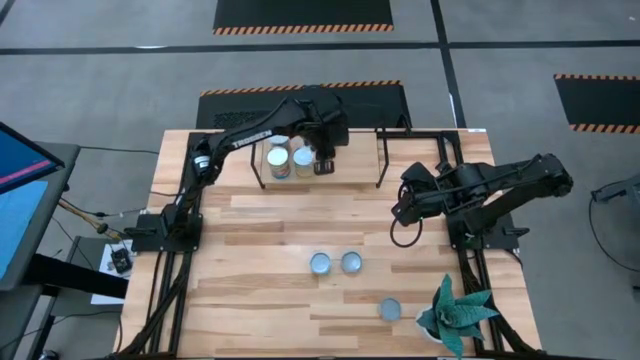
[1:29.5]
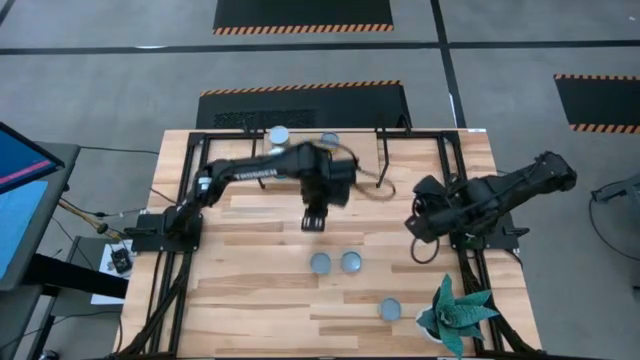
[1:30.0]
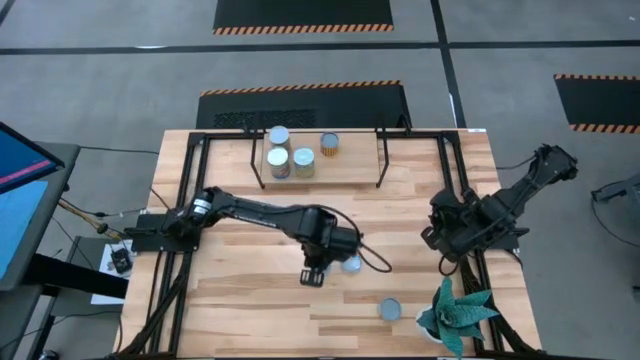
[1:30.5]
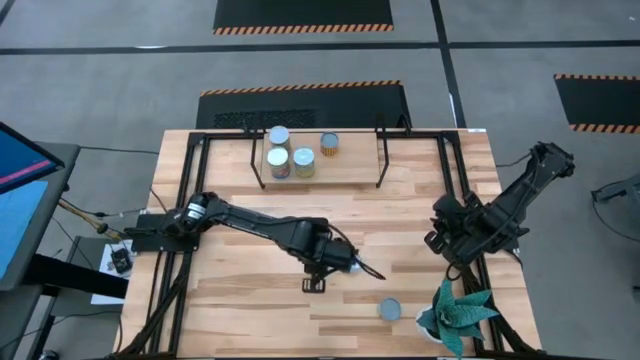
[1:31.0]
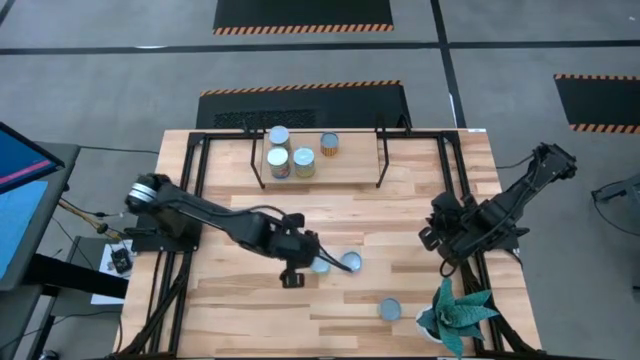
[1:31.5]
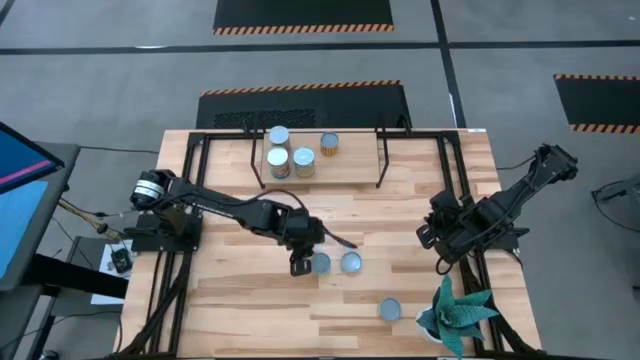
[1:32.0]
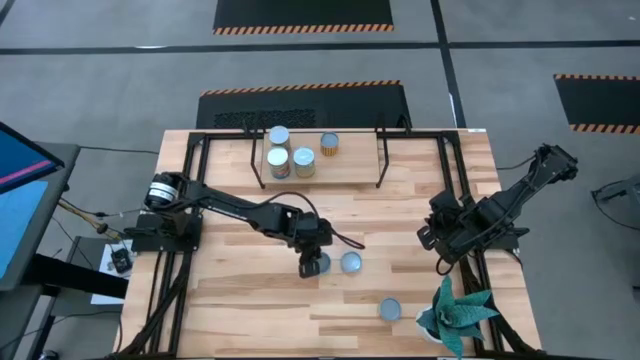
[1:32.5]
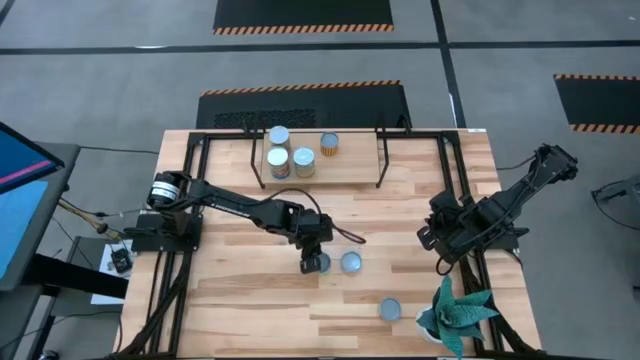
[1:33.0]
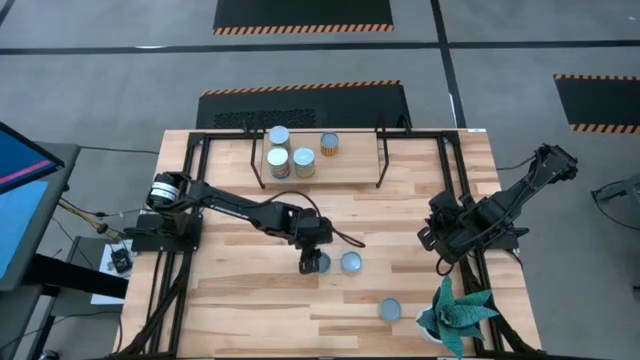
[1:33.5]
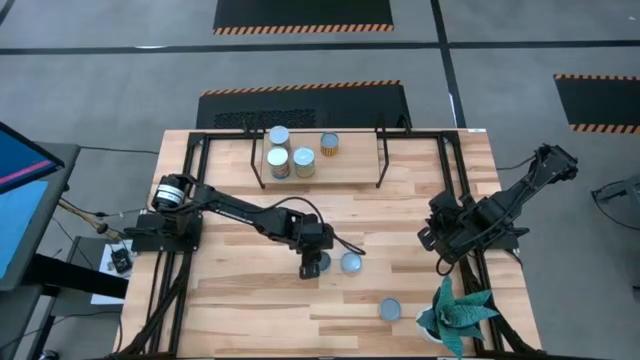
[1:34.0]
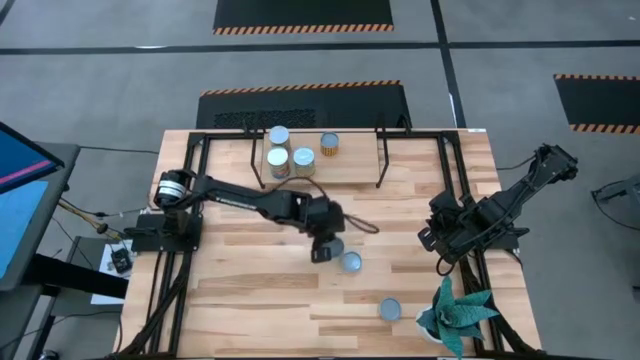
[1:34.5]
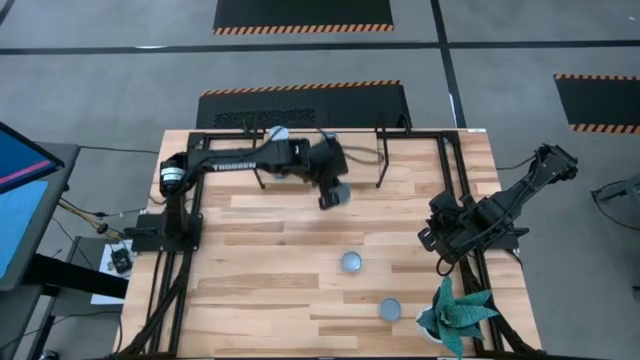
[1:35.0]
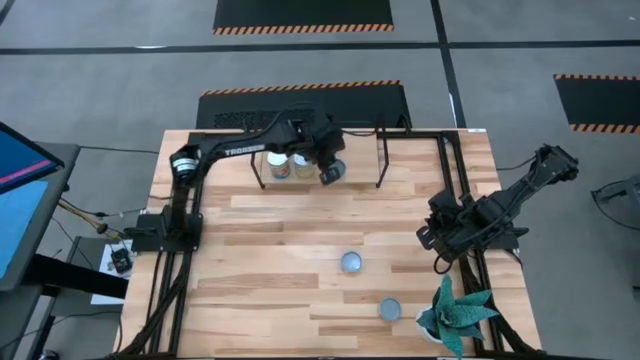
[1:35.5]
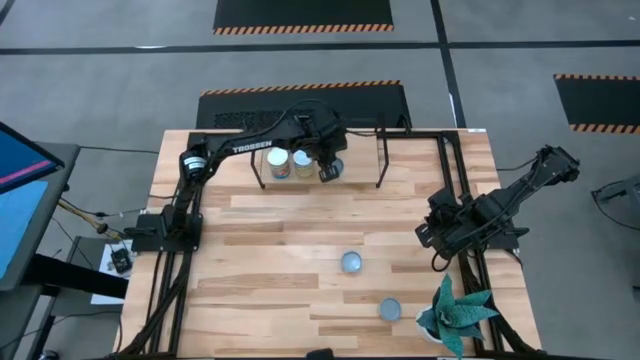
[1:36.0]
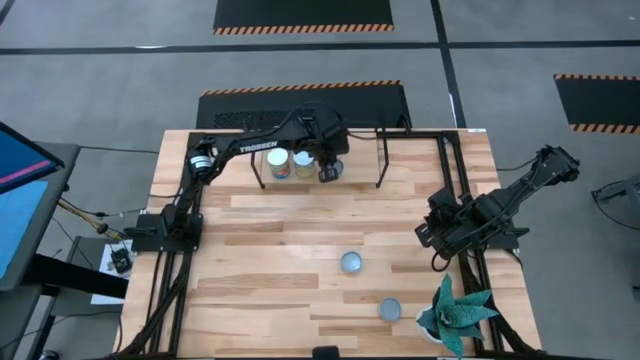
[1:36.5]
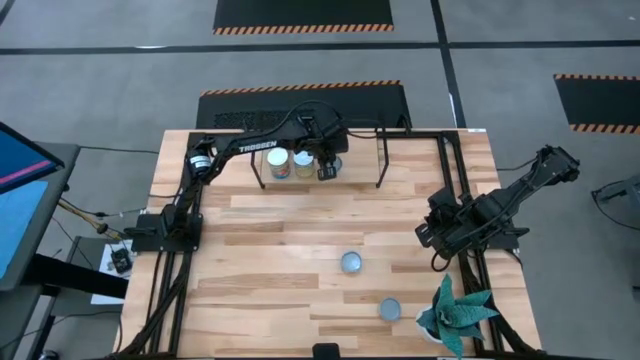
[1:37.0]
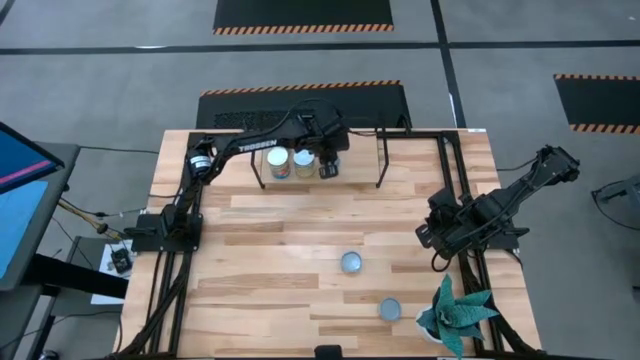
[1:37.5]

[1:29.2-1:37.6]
Task: Pick and place cans onto a shelf
Put the canned peas on the shelf

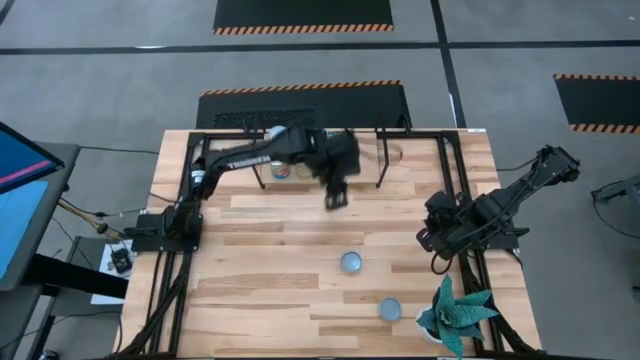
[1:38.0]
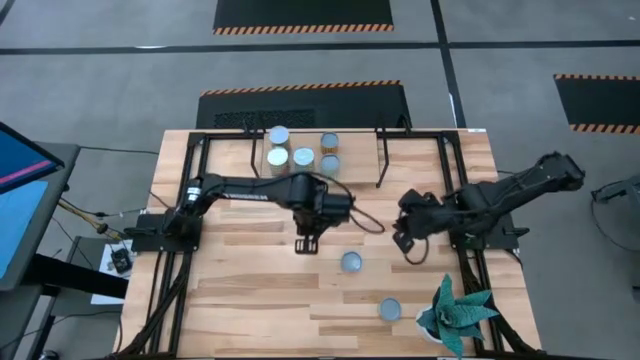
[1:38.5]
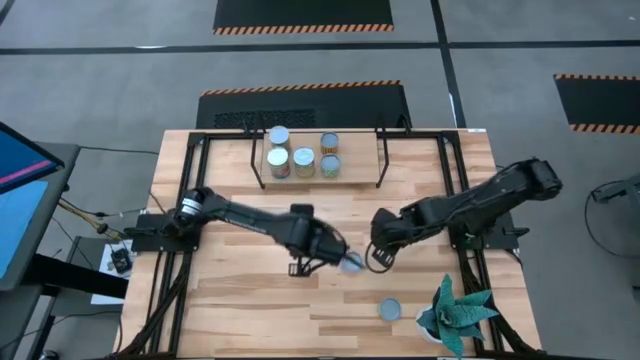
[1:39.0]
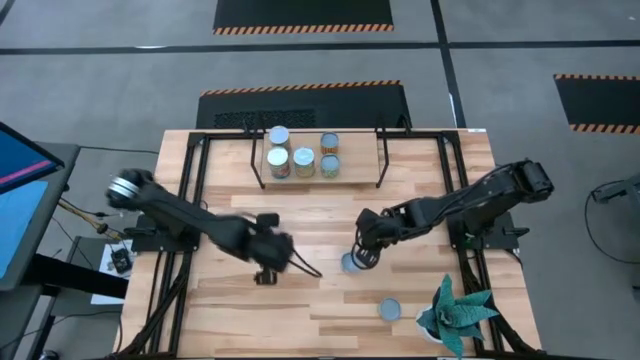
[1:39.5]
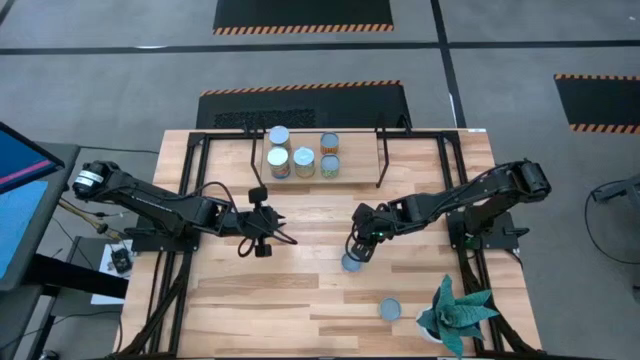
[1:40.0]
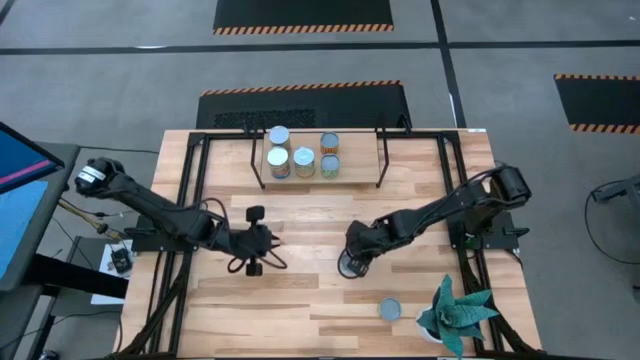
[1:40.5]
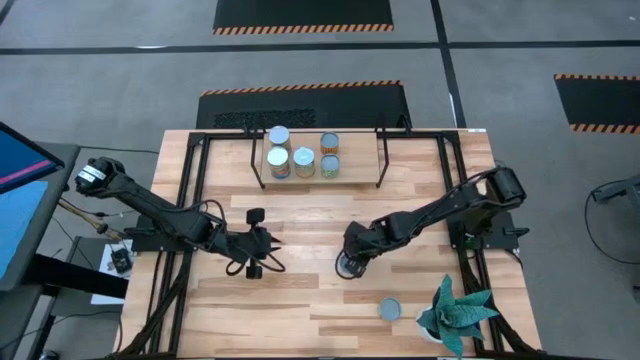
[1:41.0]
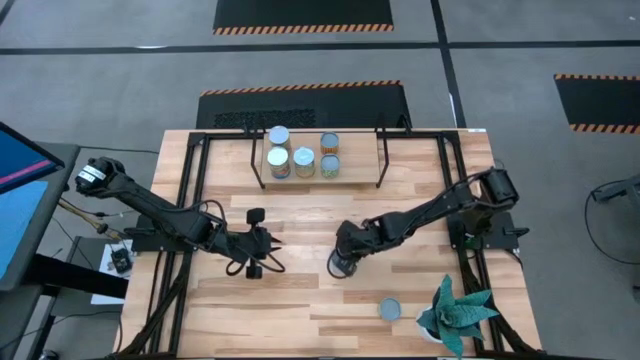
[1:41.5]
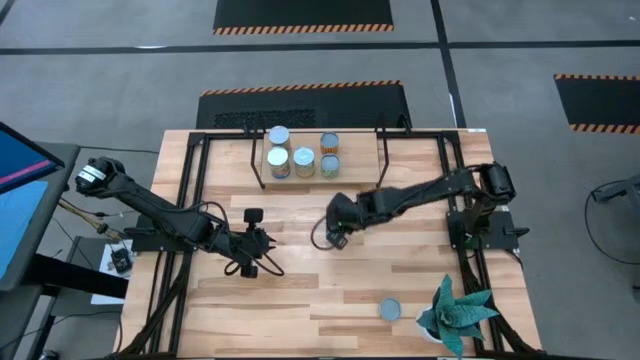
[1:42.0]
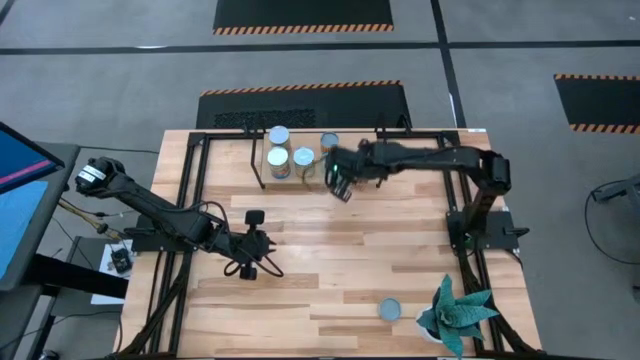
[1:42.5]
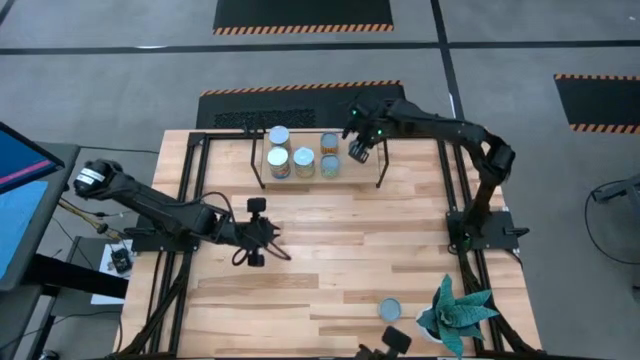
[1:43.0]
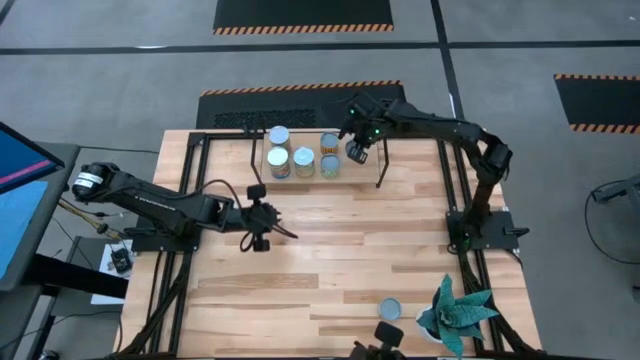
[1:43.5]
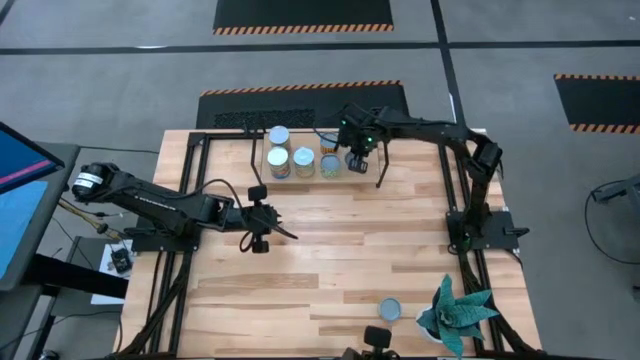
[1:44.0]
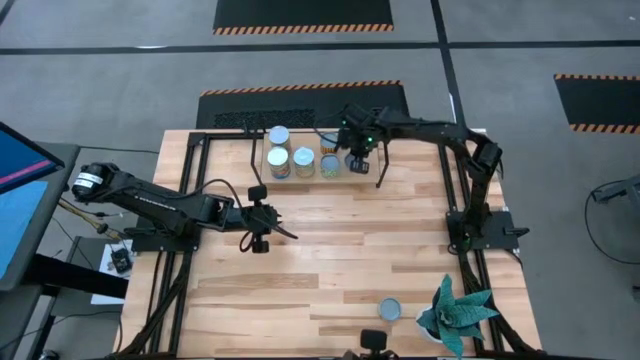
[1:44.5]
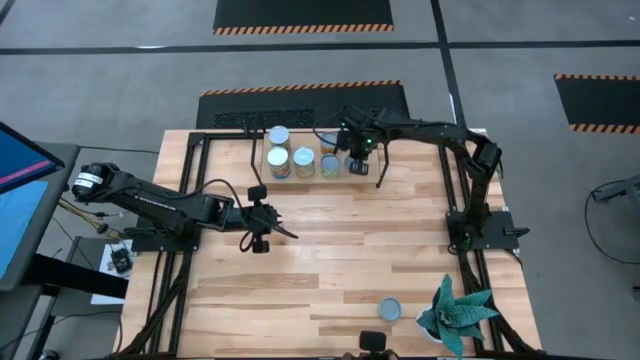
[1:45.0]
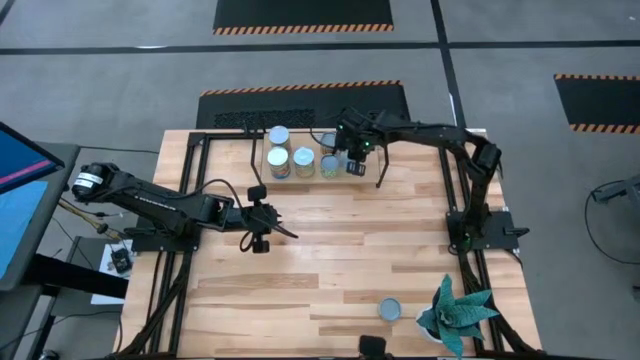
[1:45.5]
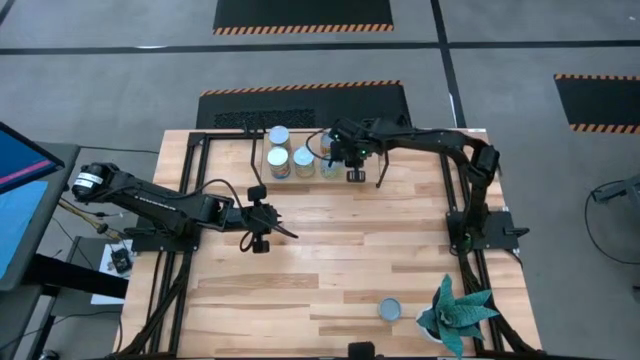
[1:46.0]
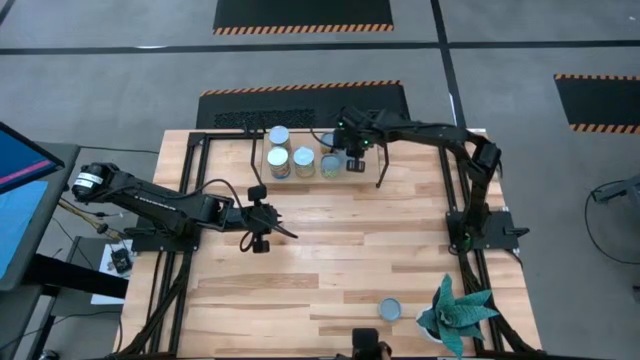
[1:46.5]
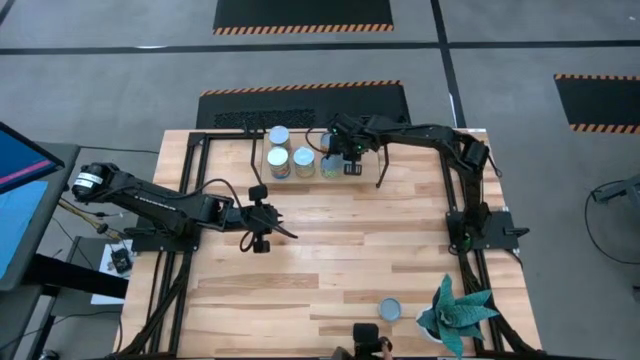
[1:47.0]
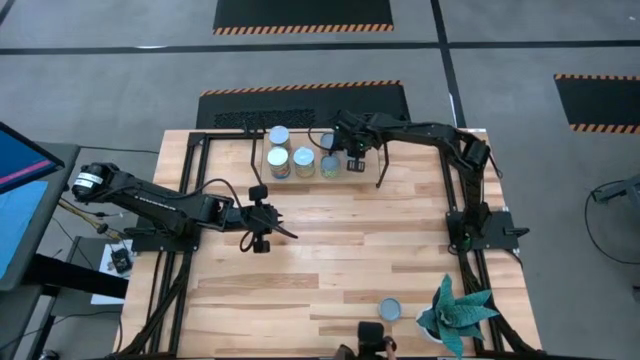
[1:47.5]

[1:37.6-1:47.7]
Put the canned salmon on the shelf

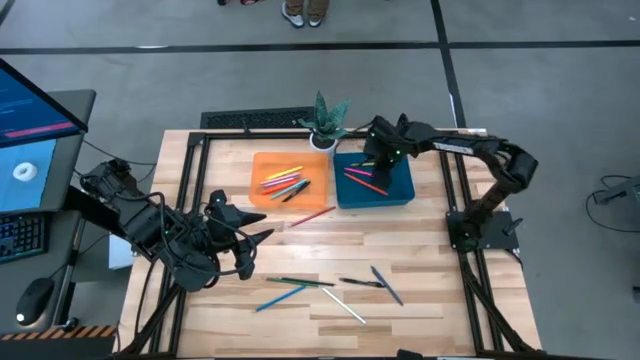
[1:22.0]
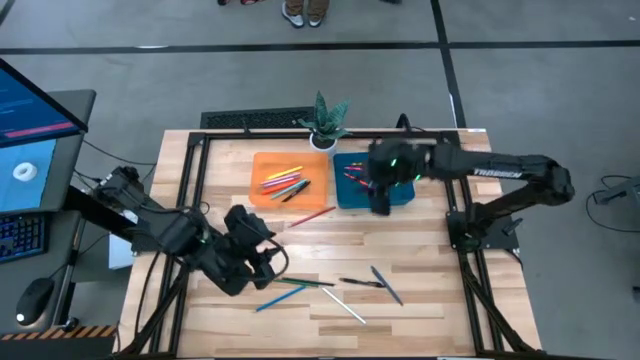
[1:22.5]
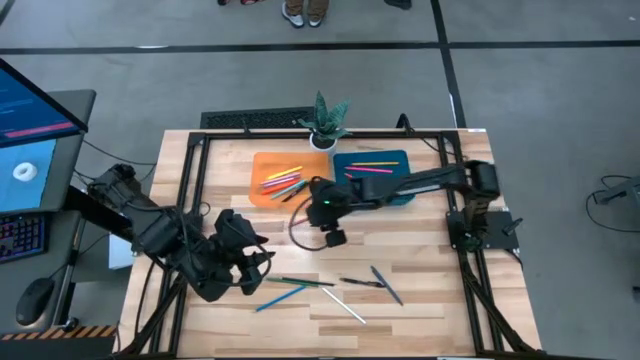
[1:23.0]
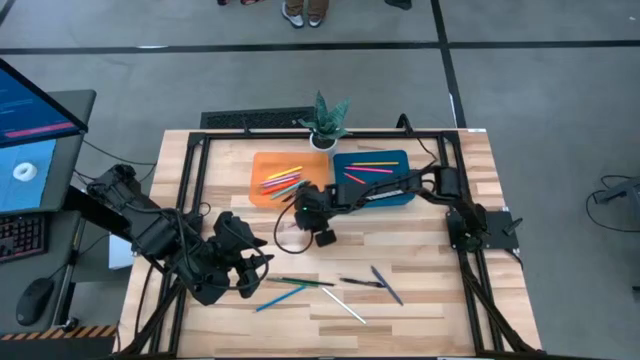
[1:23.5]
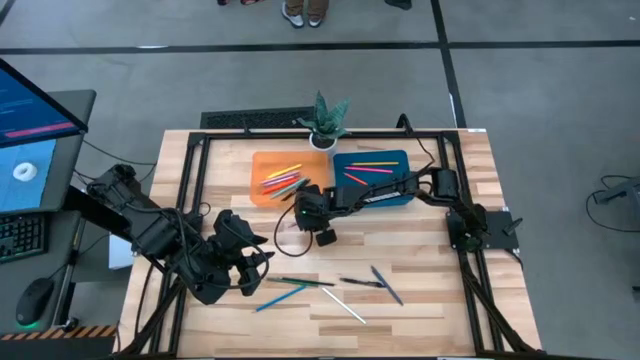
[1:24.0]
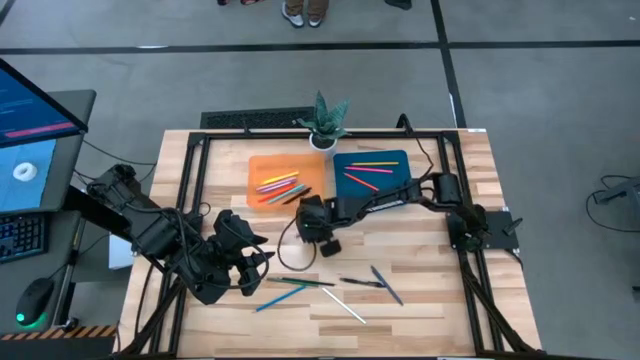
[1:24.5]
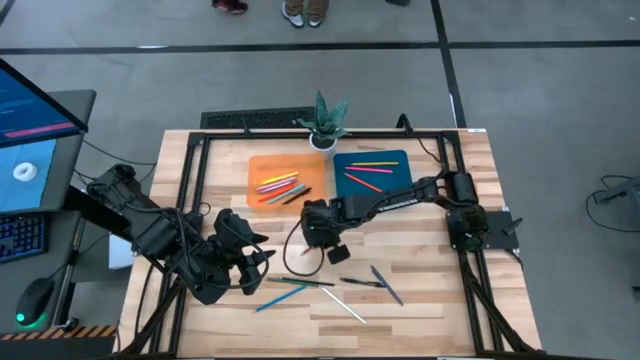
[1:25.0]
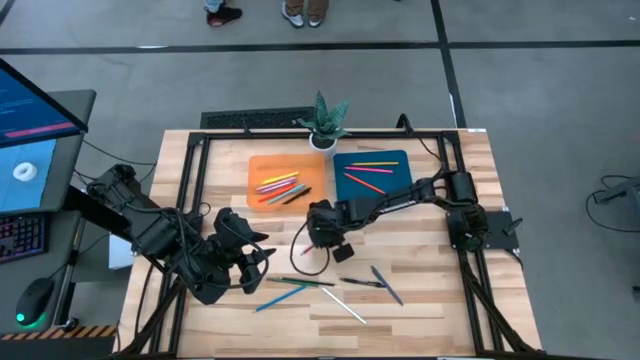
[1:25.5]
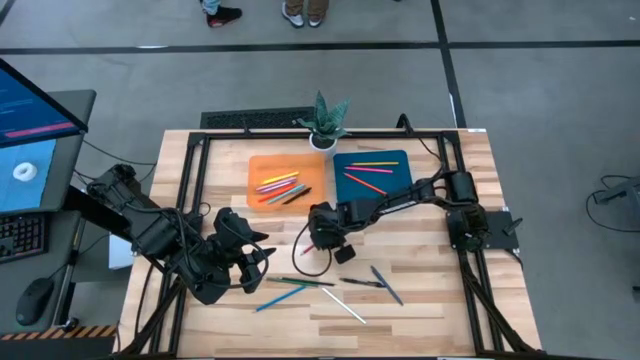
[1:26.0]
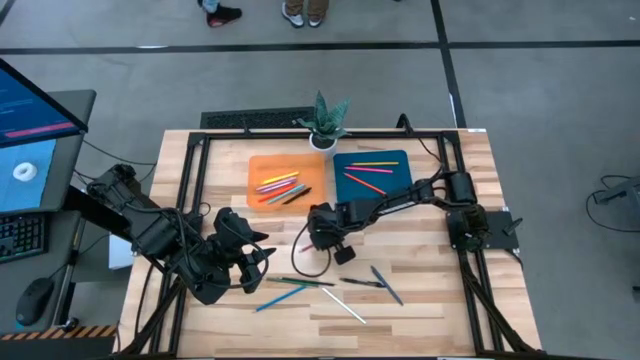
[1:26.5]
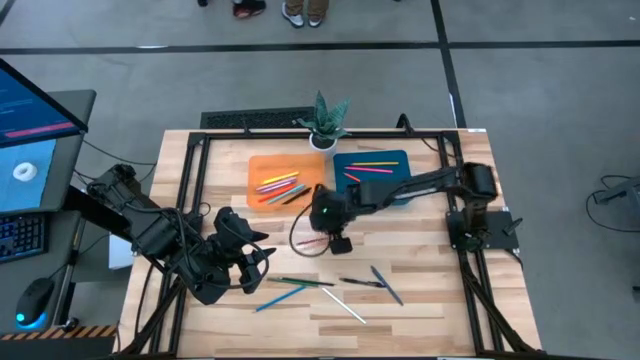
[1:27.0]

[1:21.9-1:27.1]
Task: Sort pens & pencils
Put the red pencil into the blue bin
